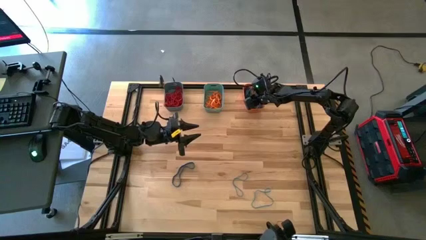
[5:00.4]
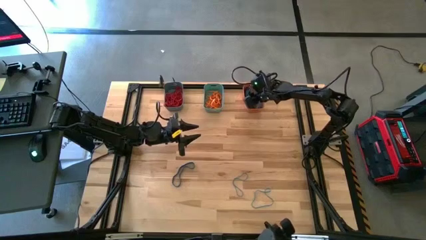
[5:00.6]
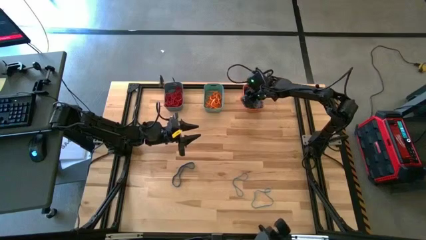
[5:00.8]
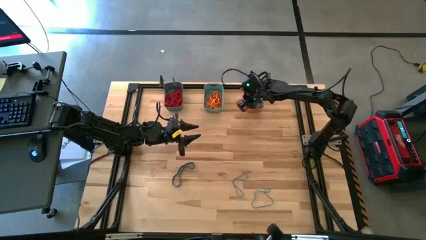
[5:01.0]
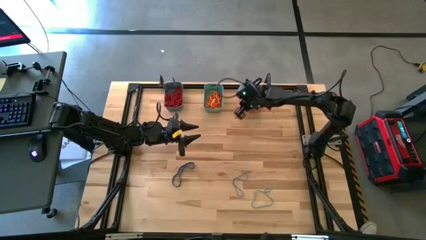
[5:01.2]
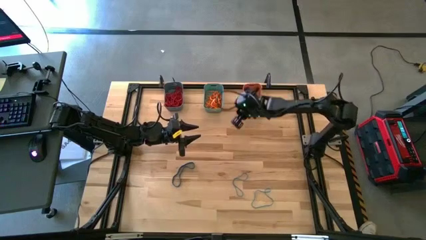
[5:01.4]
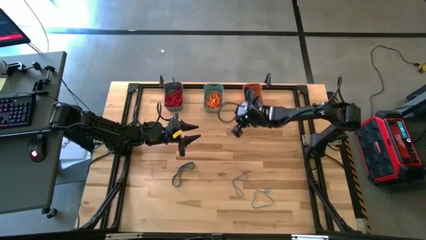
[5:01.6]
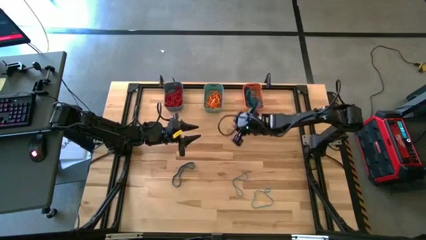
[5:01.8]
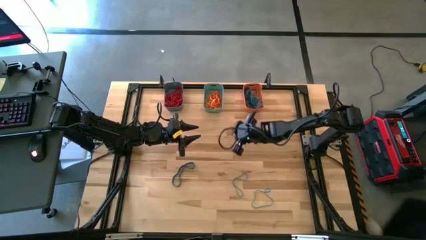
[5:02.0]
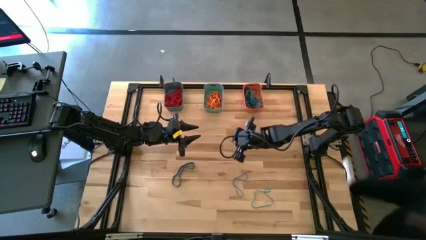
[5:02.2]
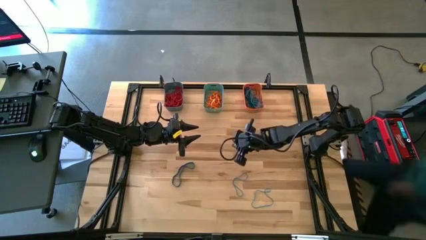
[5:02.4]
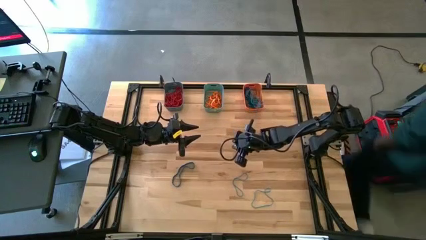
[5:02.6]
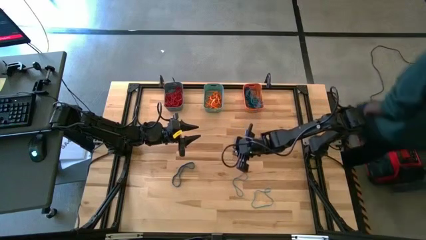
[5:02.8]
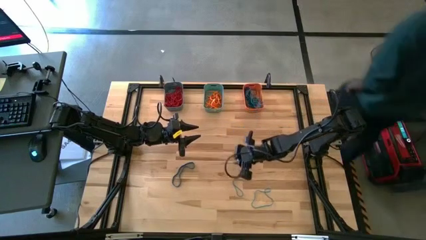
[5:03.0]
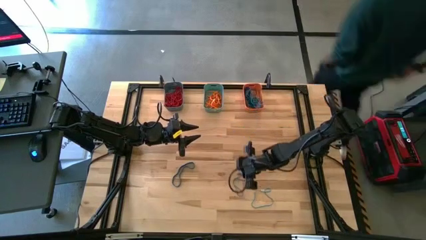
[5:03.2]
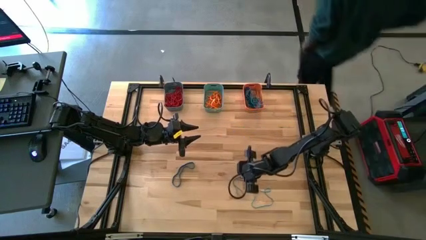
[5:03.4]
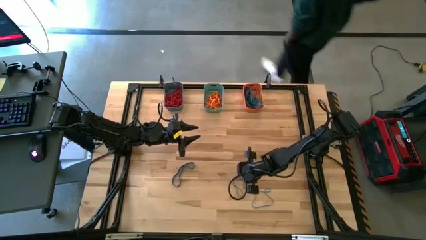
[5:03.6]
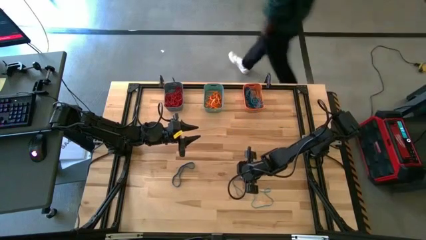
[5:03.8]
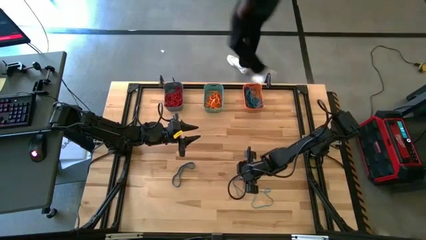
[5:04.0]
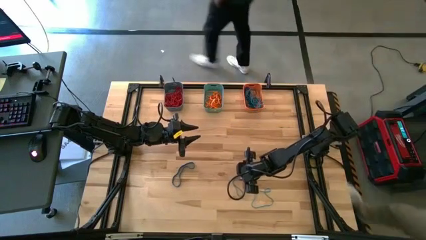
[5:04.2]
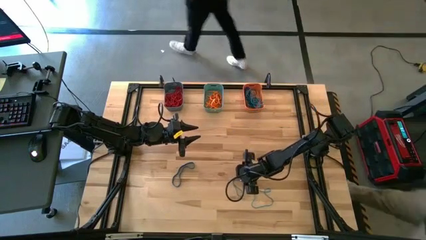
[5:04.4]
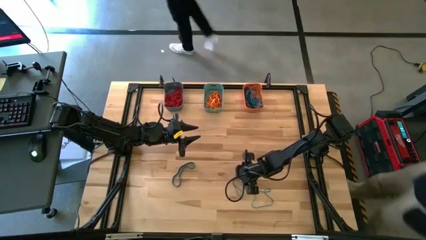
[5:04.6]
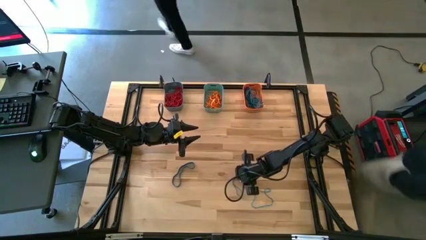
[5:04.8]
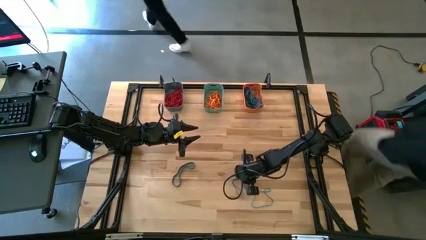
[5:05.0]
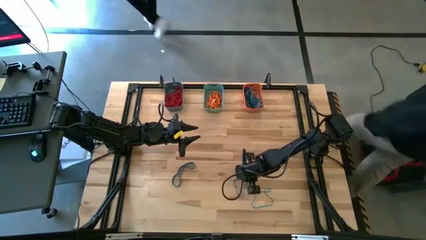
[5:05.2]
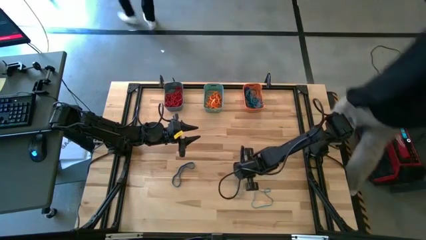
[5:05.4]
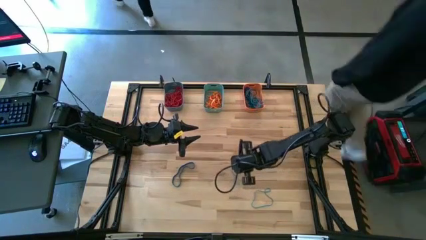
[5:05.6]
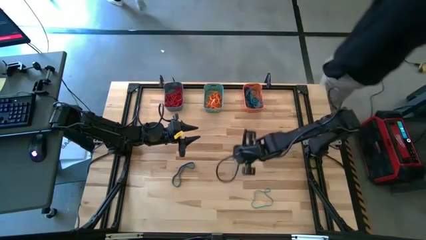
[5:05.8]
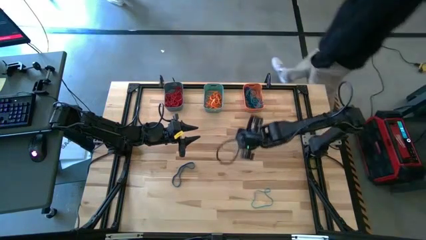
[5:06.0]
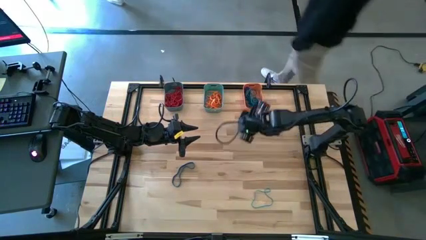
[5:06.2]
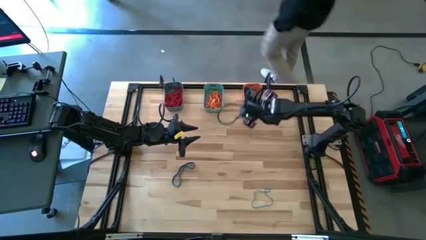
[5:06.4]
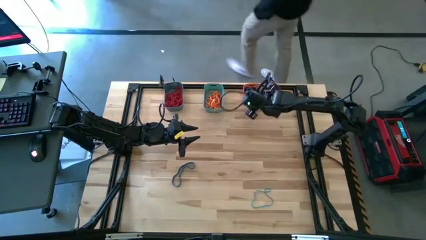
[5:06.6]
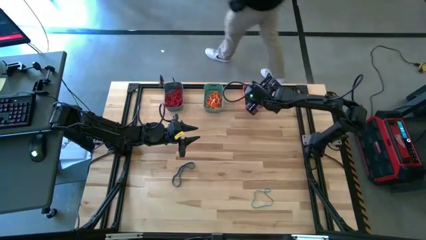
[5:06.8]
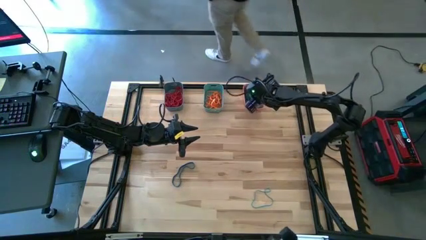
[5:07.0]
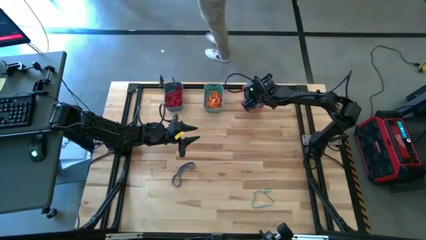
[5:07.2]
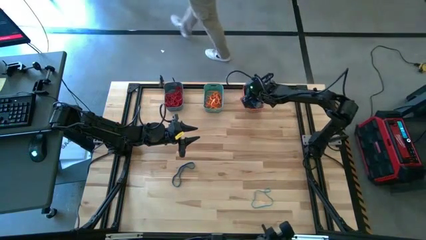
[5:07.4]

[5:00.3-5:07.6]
Task: Sort rubber bands into baskets
Put the blue rubber band into the orange bin

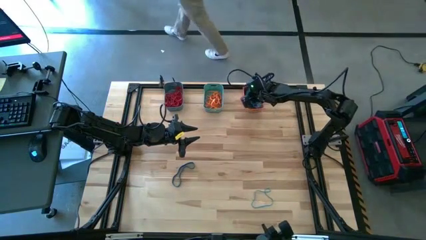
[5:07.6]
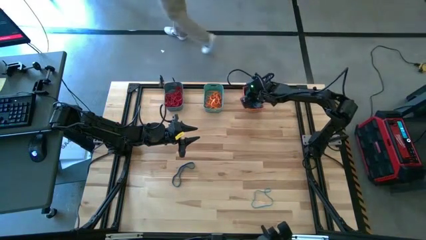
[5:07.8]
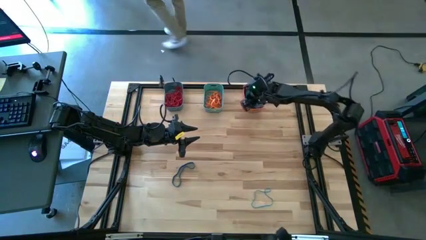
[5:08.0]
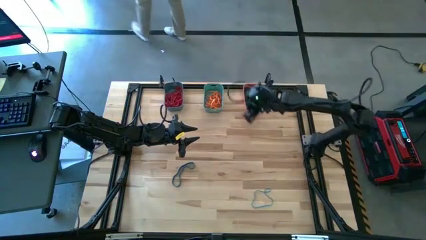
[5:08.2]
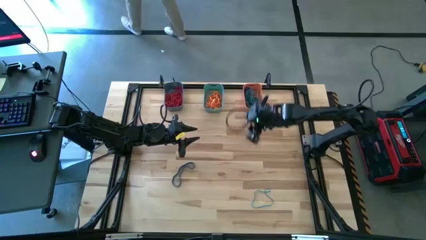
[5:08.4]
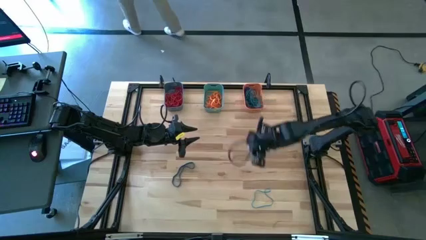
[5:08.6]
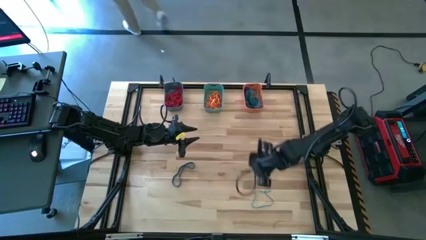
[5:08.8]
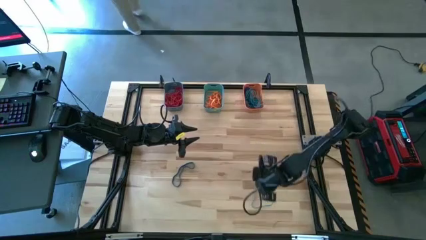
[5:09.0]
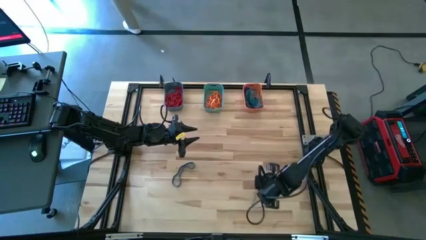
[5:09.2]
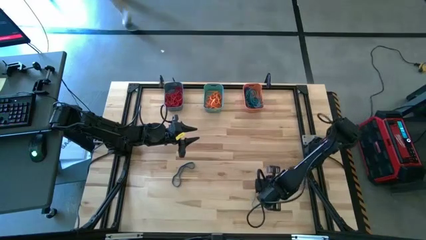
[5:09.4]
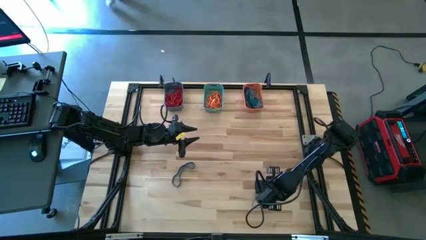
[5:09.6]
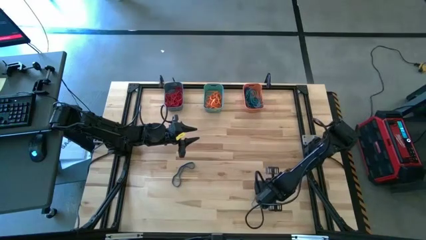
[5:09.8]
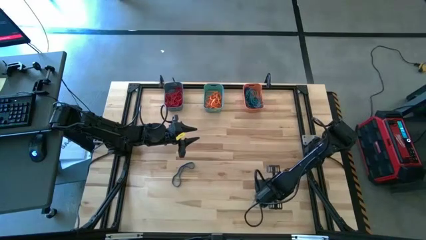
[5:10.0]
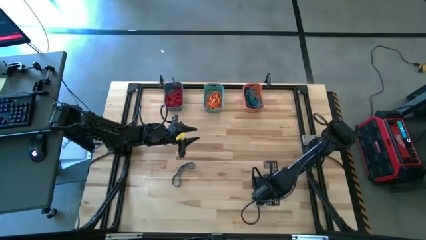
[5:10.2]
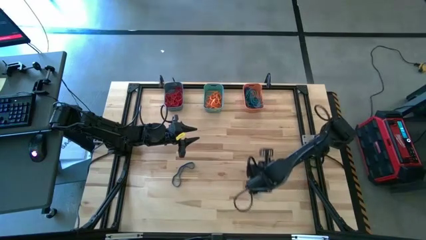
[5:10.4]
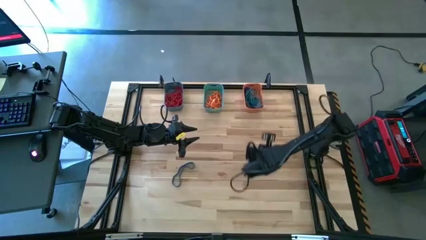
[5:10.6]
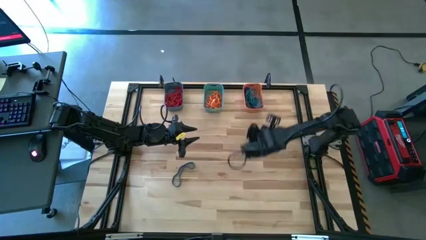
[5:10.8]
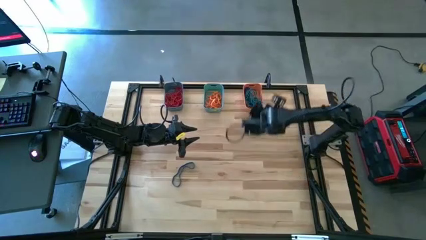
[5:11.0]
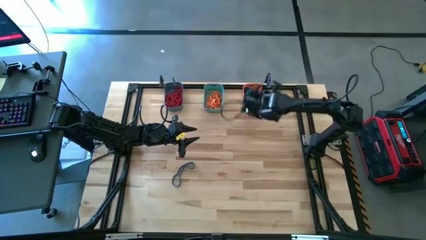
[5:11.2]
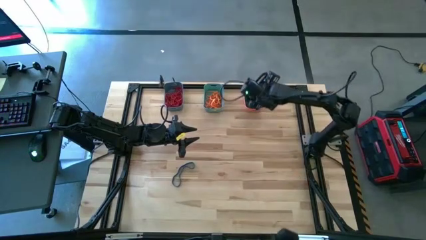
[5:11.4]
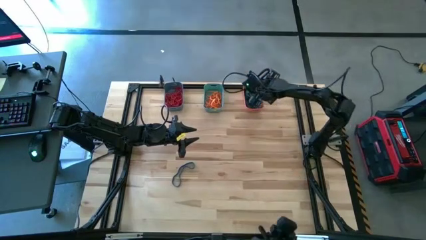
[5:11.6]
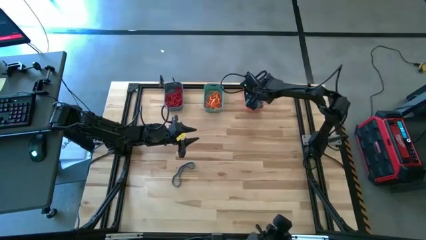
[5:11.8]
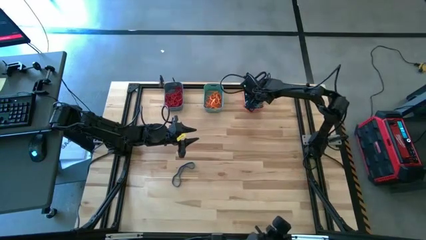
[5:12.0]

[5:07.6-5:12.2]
Put the blue rubber band into the orange bin

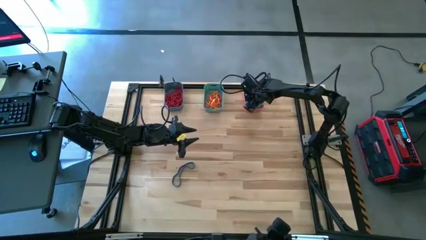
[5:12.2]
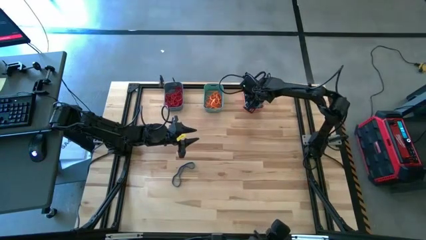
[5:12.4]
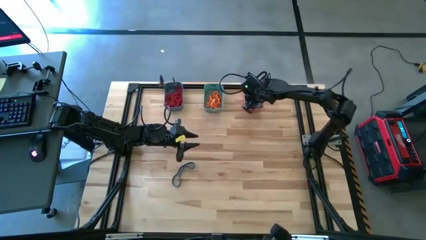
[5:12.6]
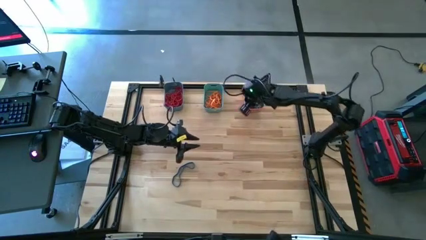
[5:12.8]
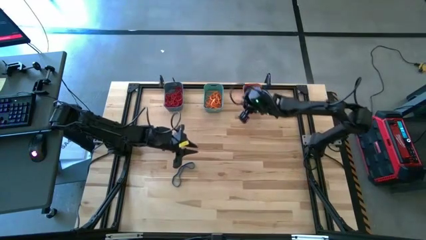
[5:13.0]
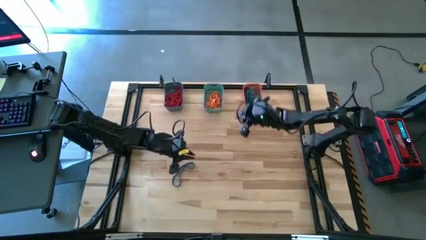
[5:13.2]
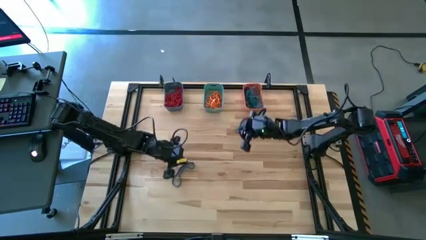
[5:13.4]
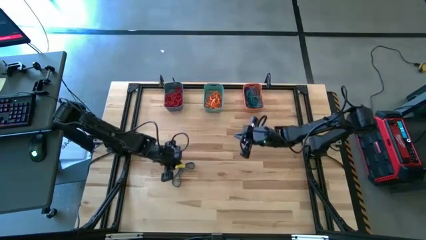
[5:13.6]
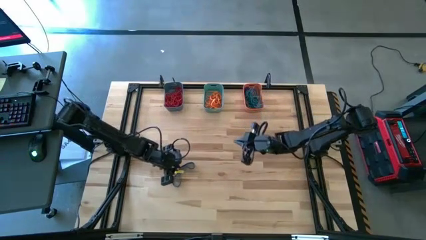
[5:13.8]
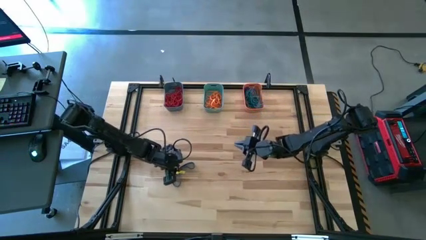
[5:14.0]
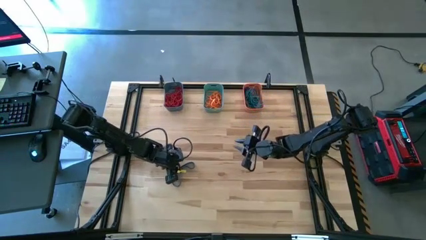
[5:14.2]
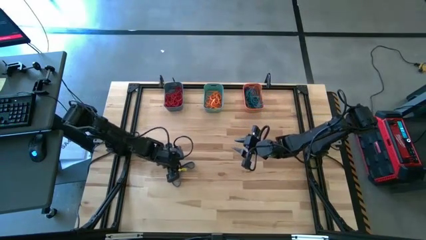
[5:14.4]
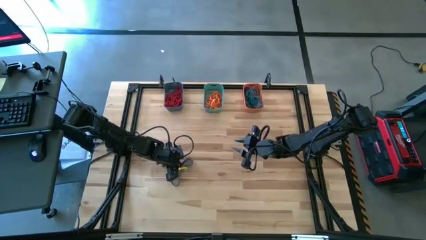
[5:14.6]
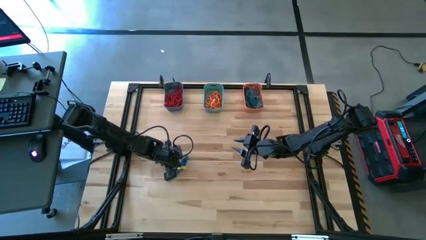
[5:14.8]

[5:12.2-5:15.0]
Put the blue rubber band into the orange bin
